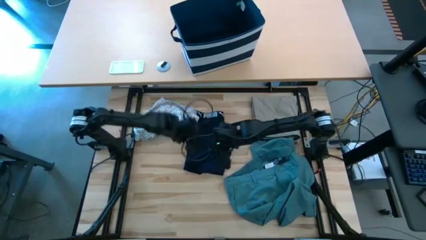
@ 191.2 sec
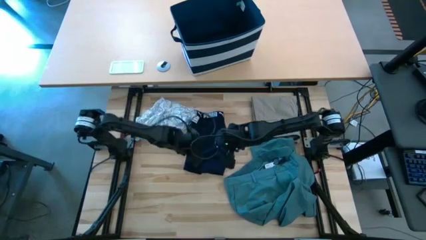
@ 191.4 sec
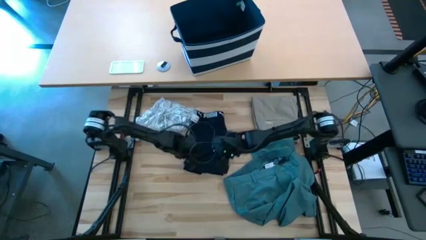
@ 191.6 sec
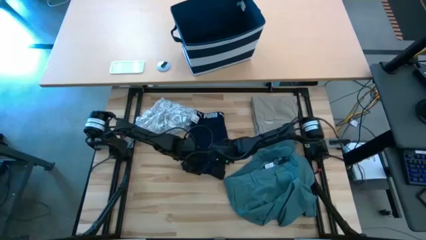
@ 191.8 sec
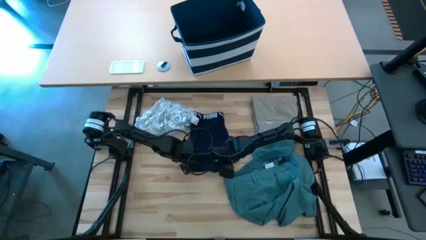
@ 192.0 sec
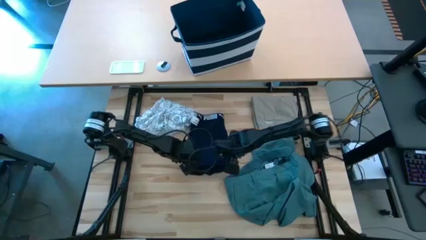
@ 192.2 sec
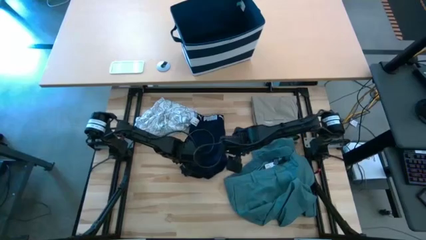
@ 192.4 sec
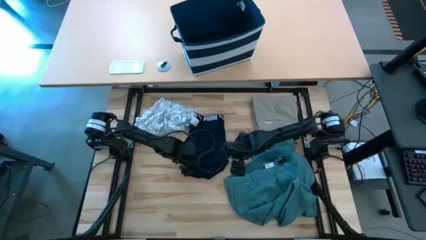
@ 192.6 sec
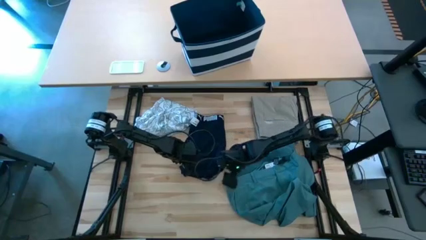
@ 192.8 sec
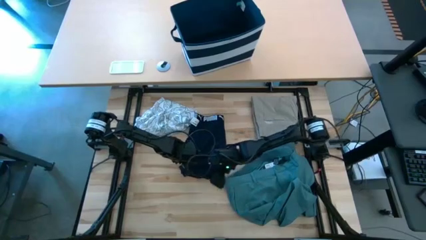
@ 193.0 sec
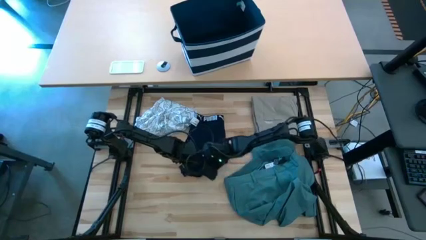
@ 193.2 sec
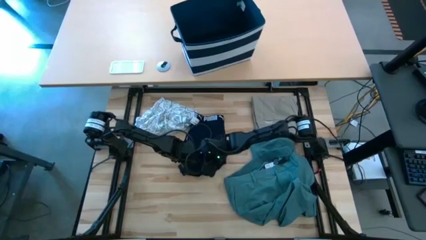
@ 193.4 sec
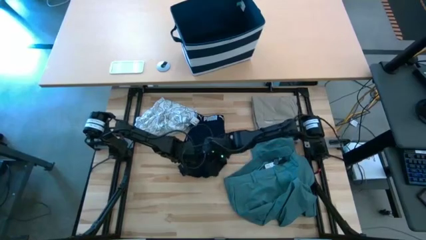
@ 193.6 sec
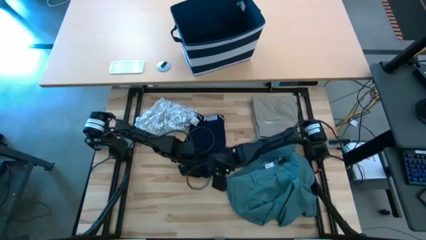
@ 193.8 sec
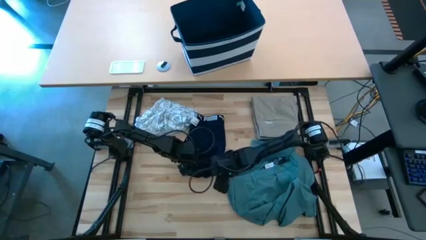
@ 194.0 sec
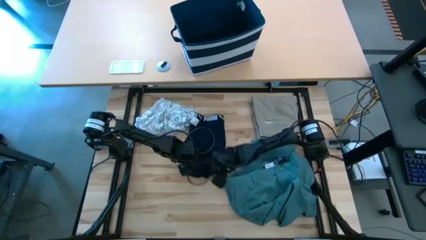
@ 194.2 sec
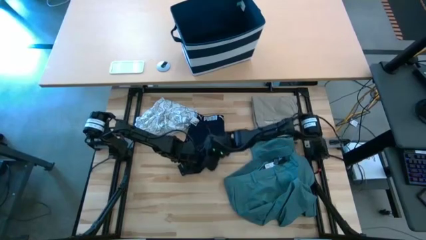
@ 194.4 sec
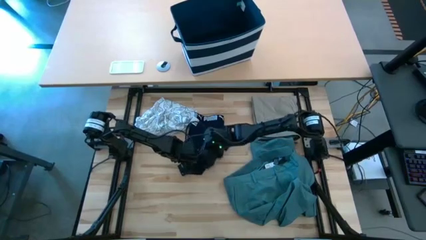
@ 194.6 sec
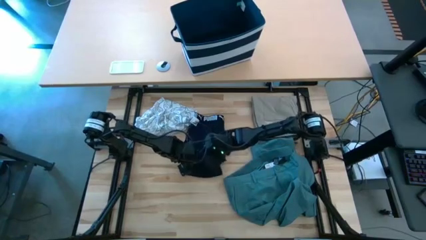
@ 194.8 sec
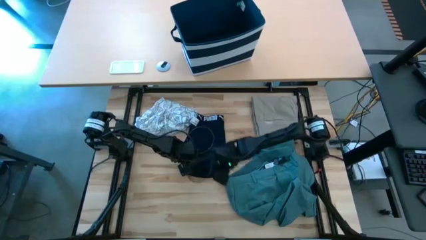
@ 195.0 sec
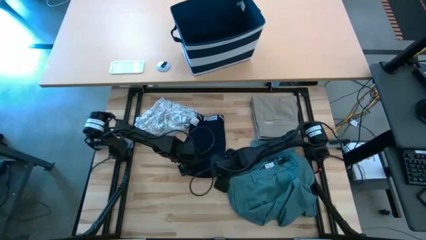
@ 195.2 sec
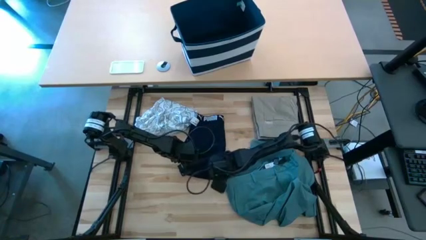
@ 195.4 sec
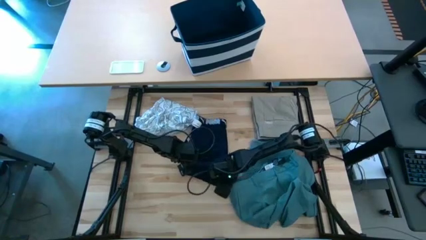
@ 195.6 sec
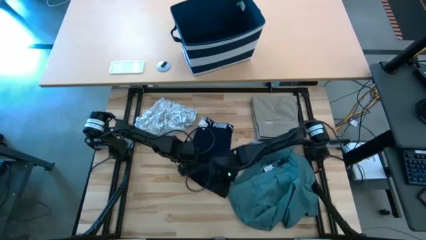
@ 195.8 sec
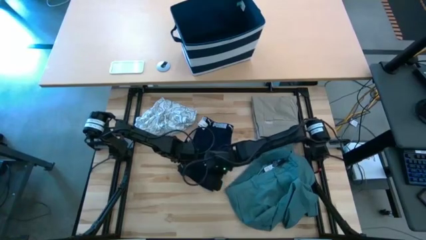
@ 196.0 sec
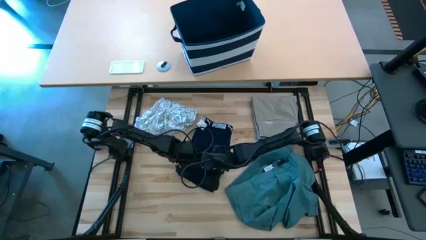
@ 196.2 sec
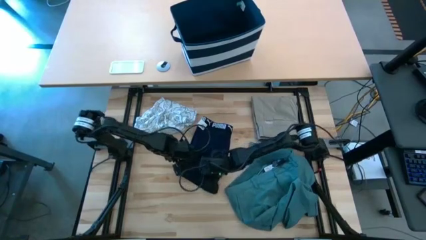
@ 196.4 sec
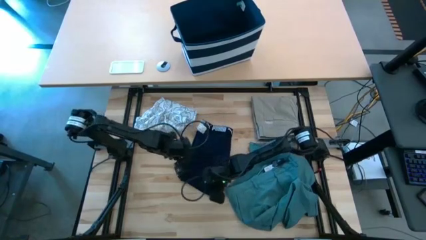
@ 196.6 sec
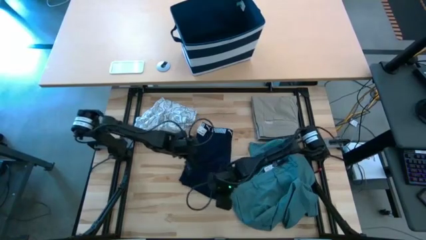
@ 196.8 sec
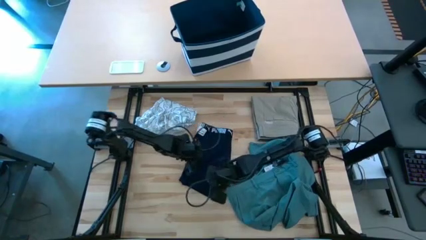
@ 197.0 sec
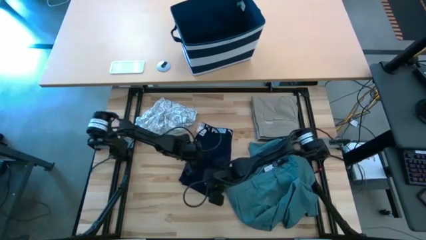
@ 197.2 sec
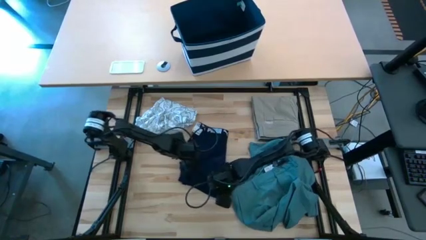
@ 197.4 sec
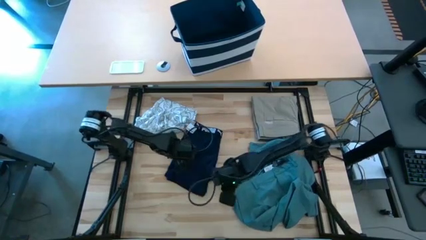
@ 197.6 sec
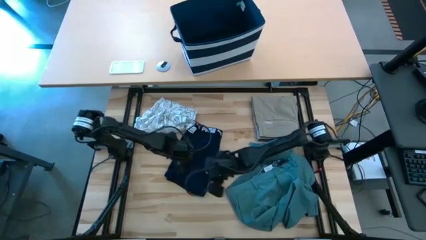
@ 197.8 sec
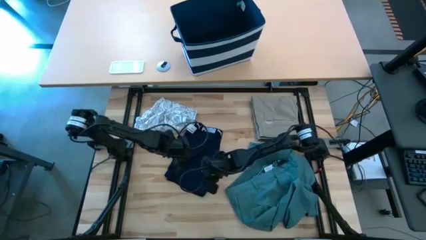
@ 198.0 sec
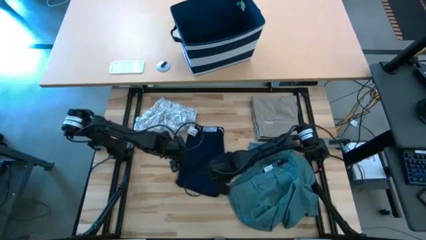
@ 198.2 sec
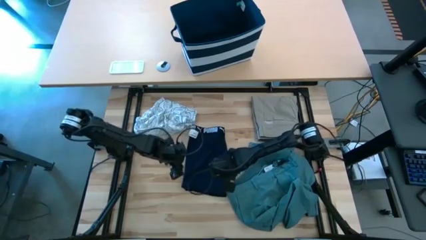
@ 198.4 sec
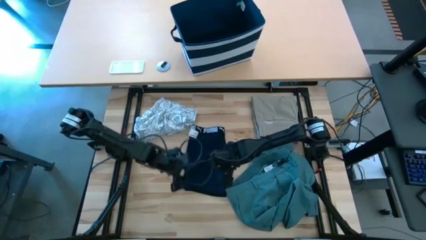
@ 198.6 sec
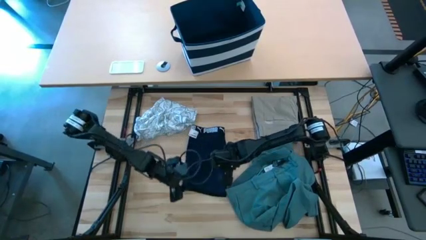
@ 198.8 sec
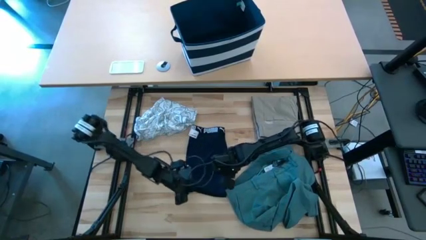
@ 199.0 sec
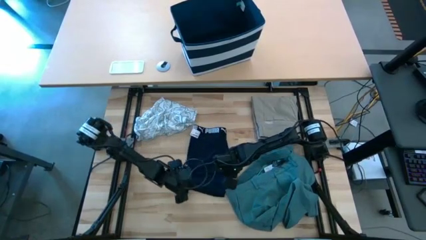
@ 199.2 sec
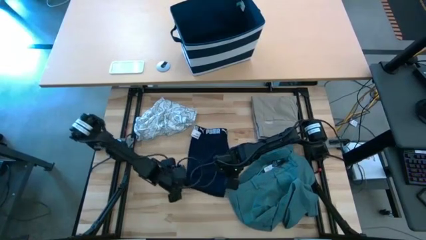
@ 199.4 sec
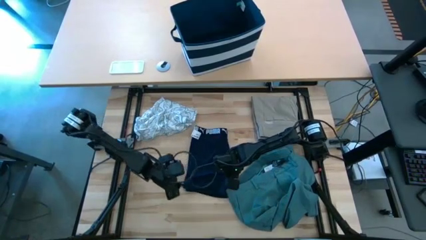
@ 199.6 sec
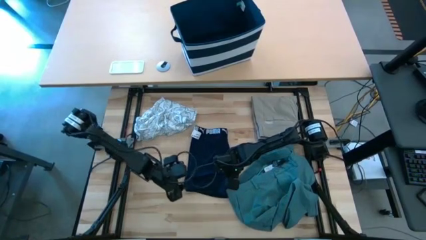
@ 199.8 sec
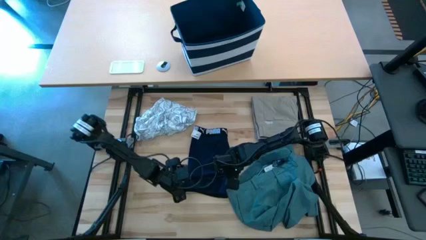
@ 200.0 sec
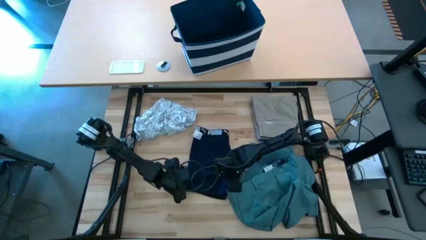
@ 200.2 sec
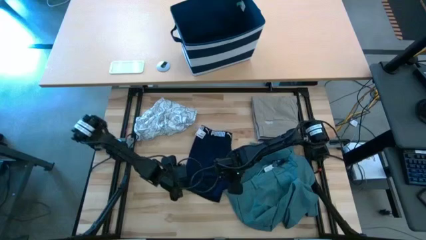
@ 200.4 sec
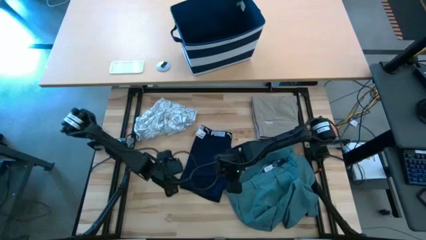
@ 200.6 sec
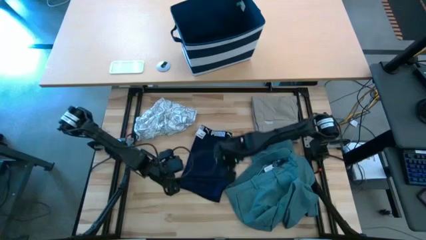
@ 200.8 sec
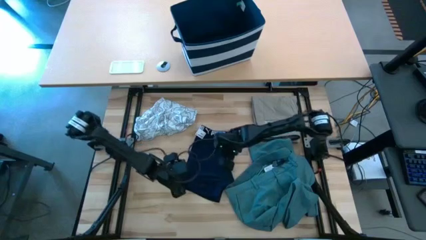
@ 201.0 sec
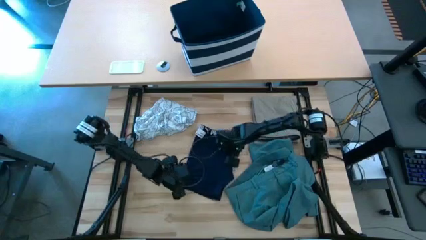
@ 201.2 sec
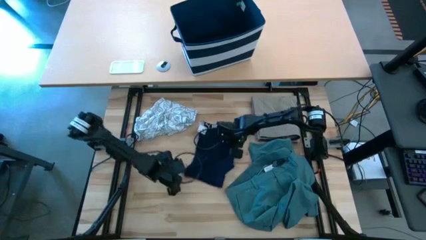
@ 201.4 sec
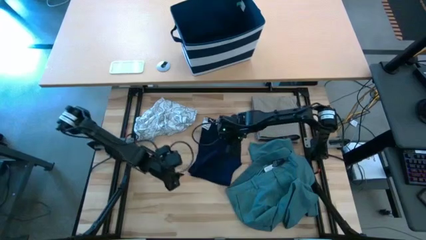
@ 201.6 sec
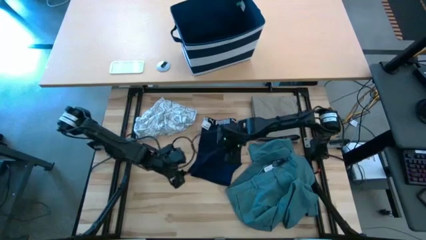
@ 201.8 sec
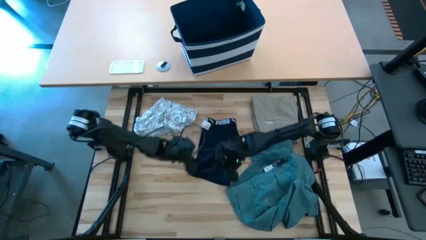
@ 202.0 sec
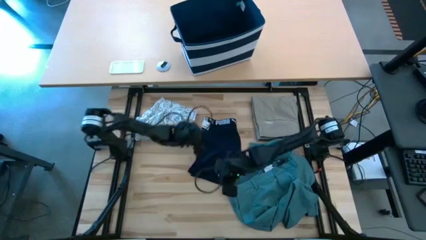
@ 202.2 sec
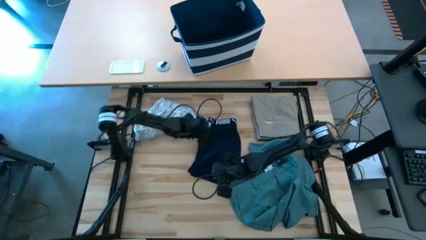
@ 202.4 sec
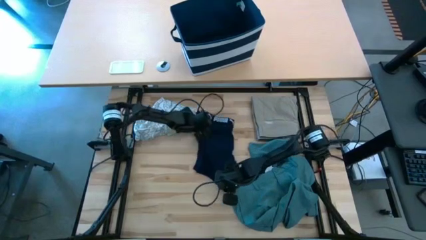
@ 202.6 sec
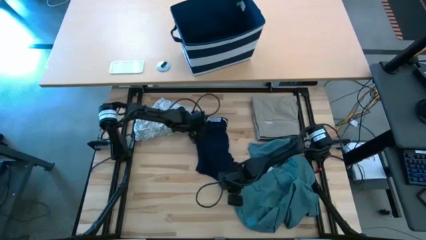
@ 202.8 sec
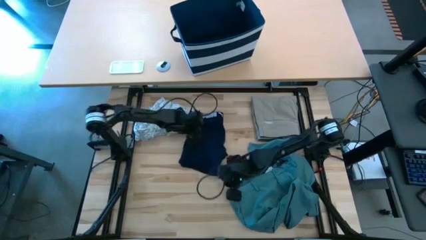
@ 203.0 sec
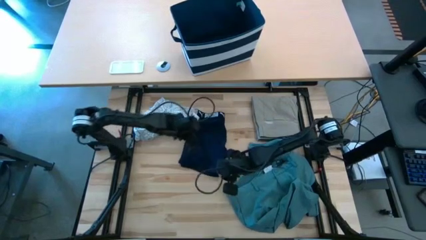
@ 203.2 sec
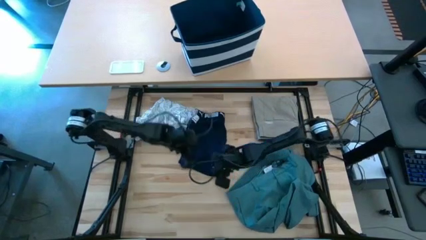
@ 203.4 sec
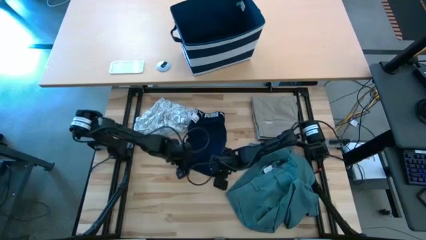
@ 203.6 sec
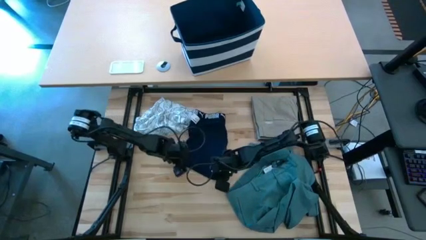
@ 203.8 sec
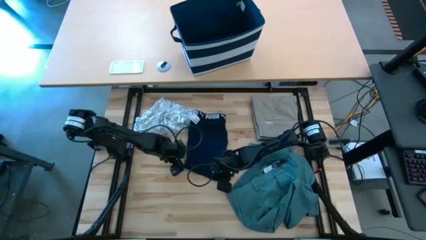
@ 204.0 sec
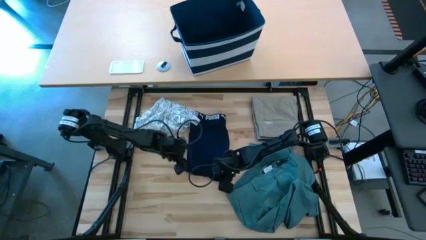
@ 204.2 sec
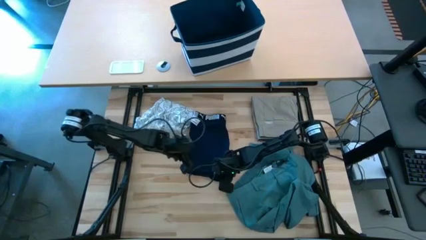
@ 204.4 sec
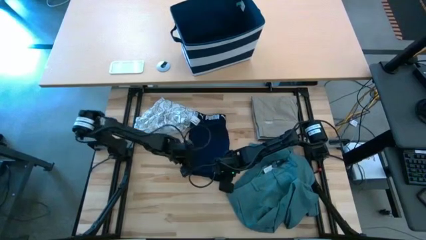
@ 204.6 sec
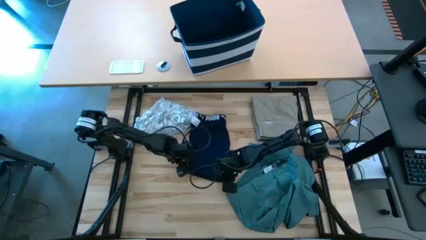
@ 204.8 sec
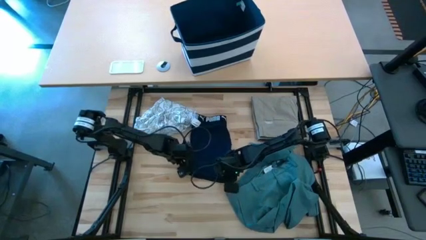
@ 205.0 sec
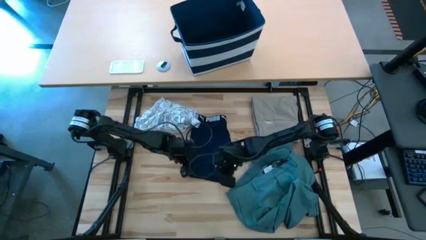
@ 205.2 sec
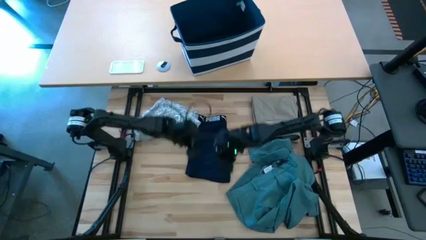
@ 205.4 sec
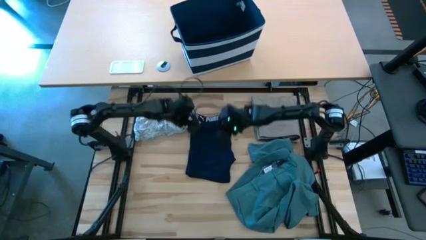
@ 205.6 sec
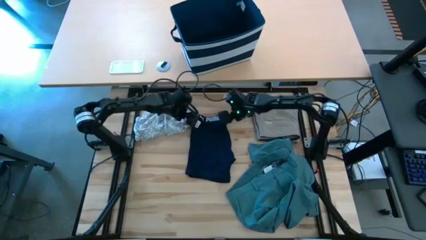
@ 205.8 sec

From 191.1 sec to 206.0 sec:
Task: Fold Laundry from Bin
Fold the blue boxer

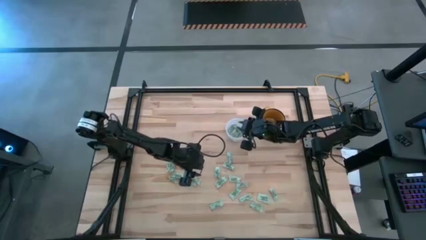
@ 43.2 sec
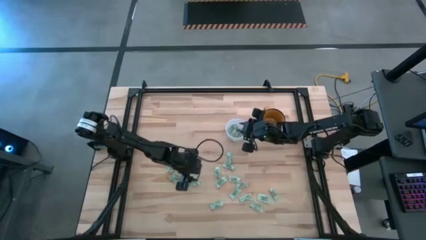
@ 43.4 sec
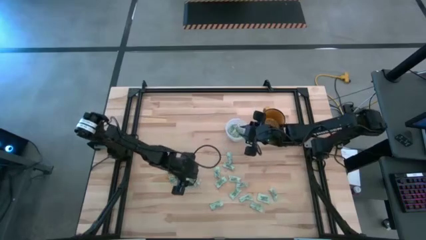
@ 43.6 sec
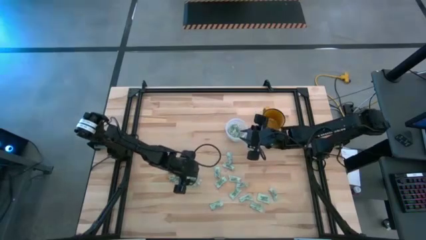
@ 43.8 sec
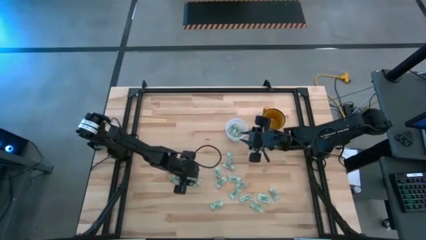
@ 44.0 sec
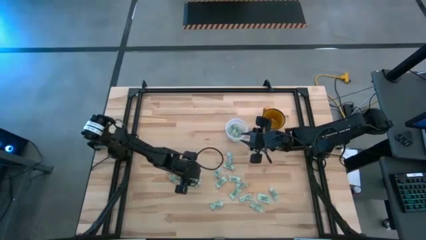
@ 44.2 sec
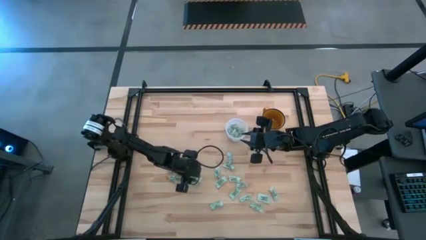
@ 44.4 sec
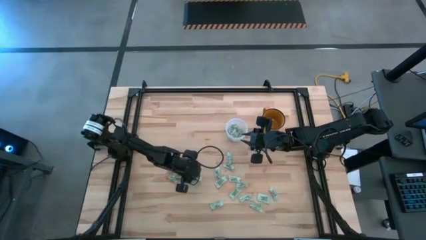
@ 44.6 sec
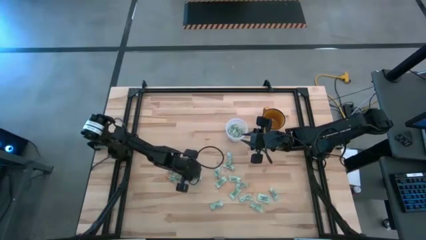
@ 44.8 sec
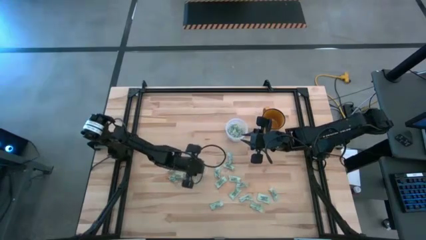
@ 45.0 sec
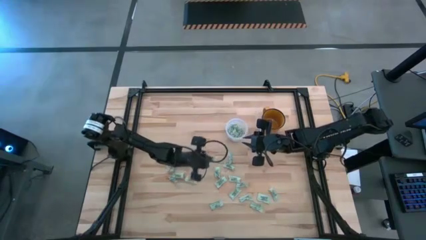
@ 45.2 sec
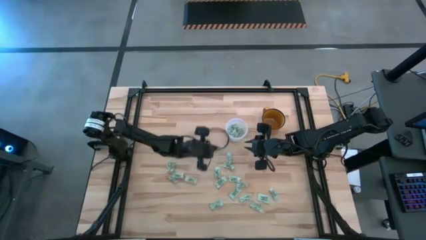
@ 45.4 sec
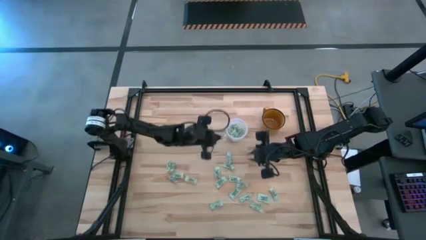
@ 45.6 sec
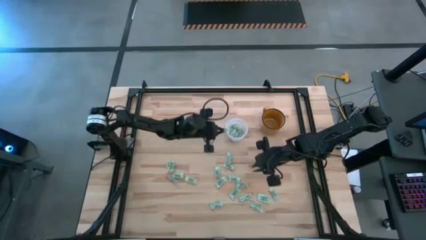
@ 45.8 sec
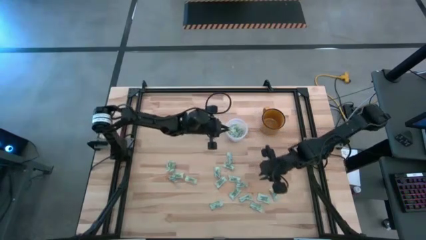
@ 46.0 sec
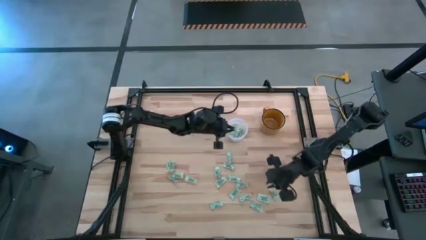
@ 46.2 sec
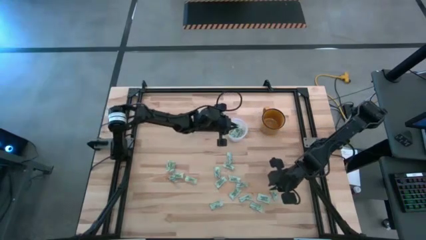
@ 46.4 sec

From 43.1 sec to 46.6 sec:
Task: Pick and place Stevia / Truvia into bins
Put the green stevia packet into the transparent bin
